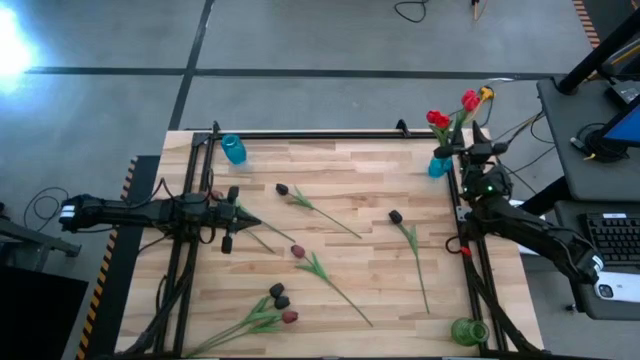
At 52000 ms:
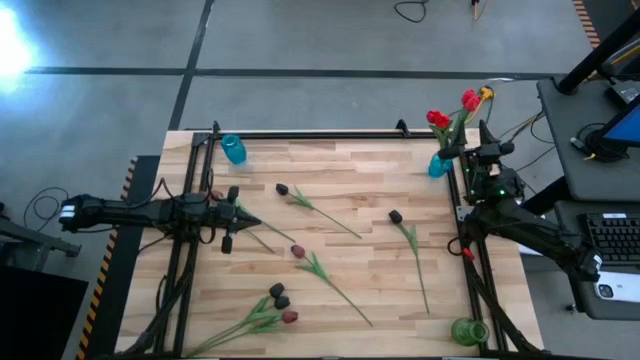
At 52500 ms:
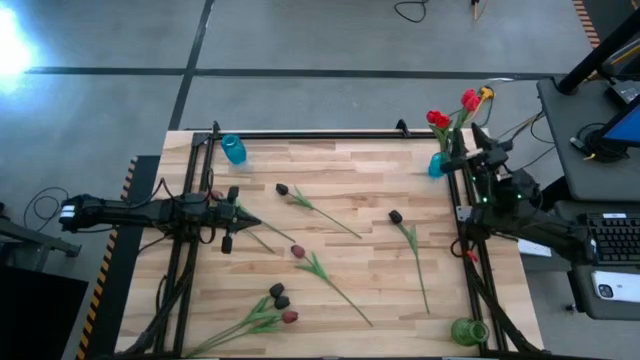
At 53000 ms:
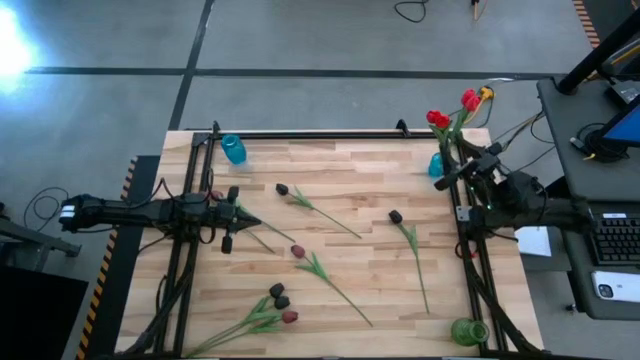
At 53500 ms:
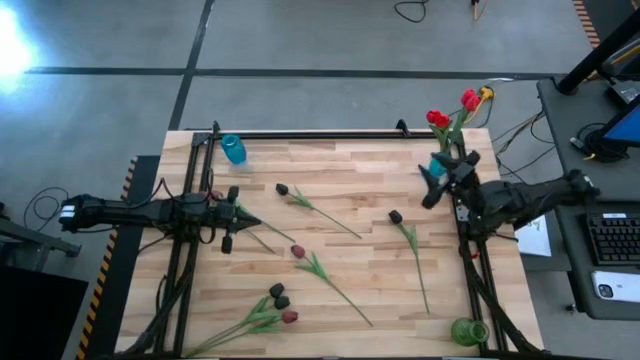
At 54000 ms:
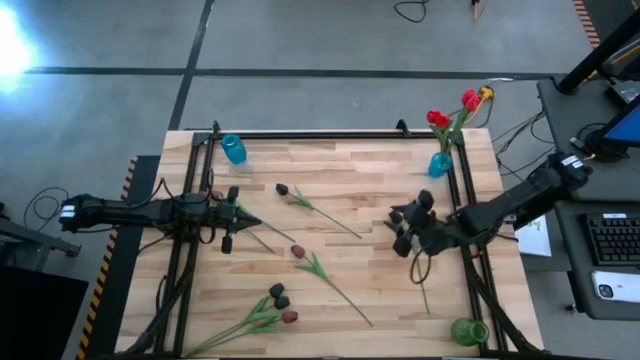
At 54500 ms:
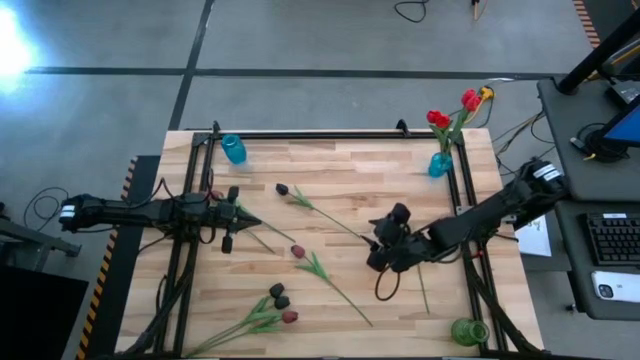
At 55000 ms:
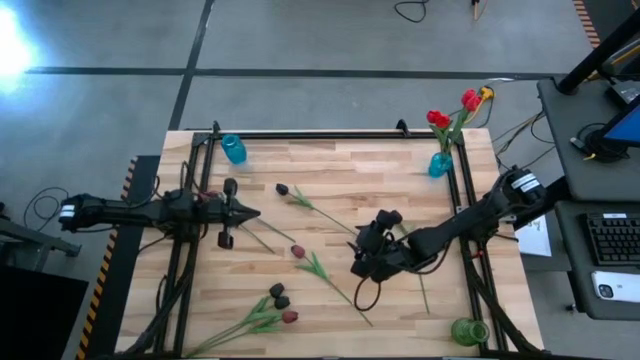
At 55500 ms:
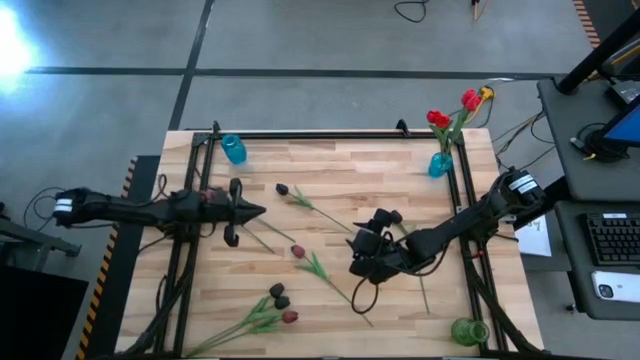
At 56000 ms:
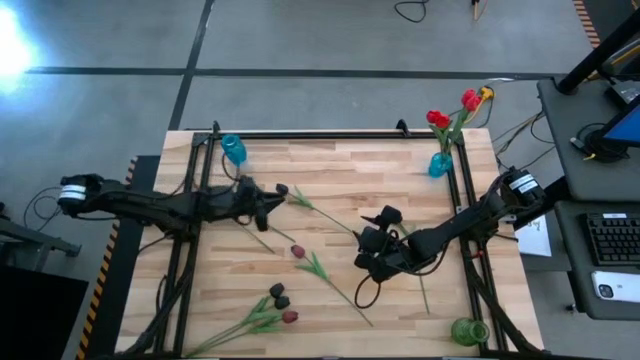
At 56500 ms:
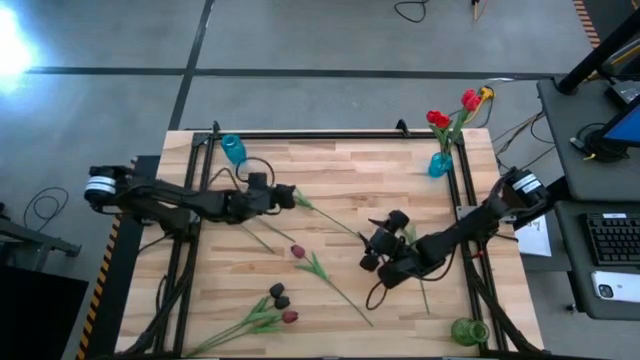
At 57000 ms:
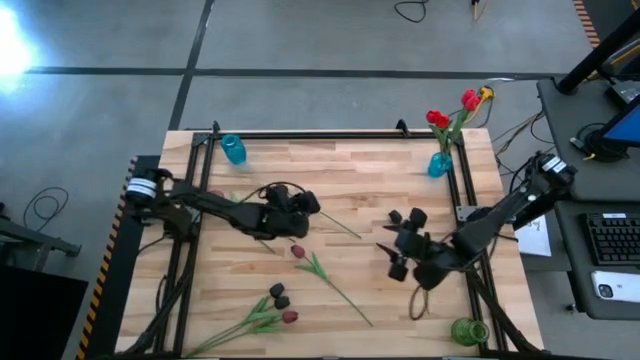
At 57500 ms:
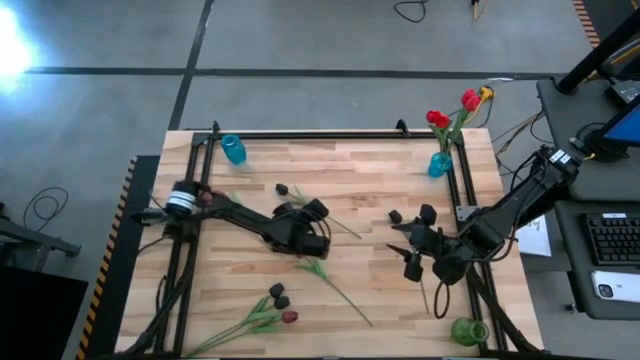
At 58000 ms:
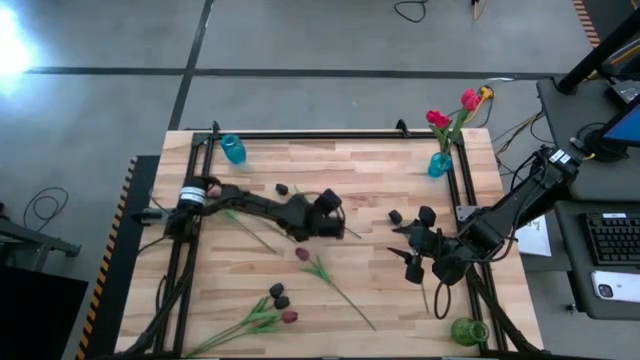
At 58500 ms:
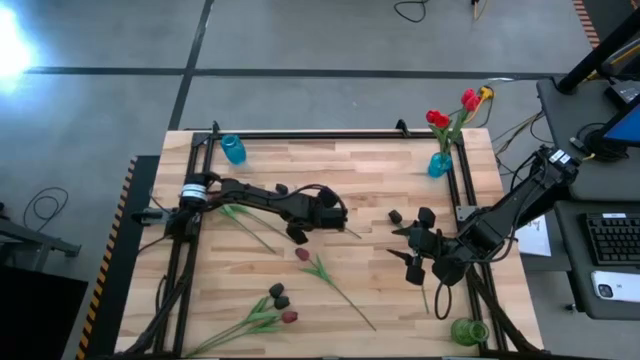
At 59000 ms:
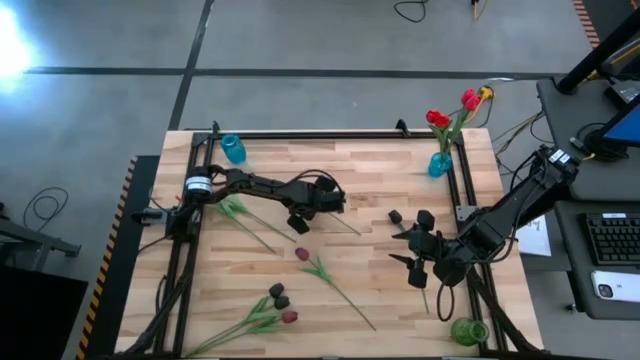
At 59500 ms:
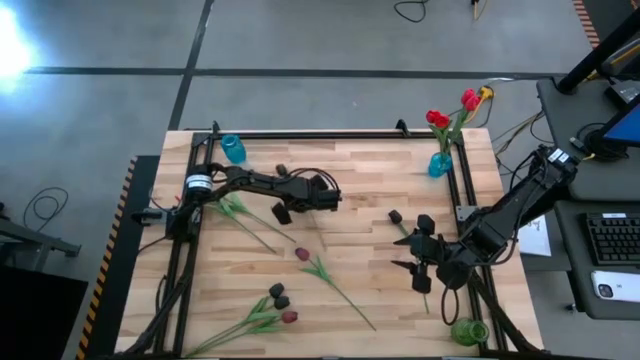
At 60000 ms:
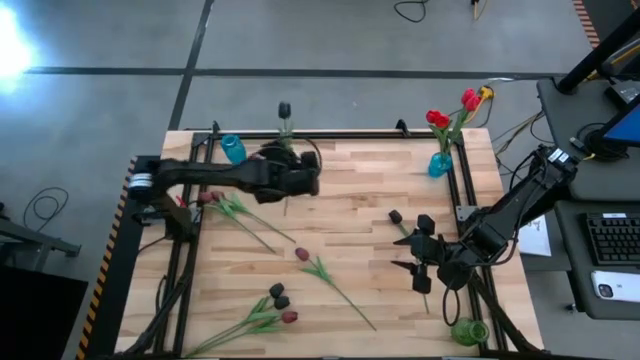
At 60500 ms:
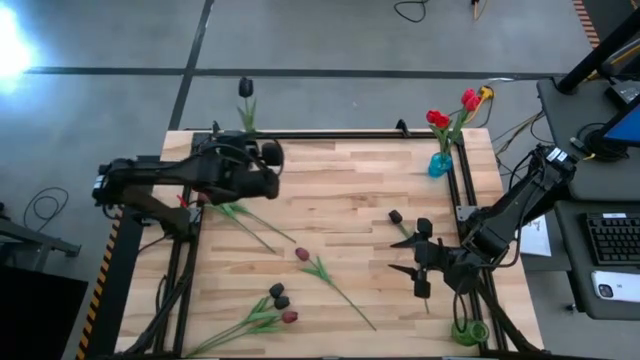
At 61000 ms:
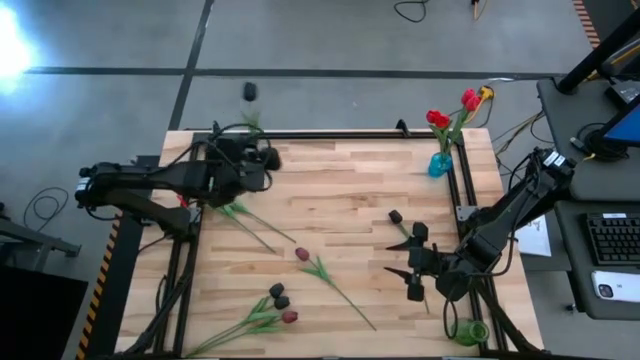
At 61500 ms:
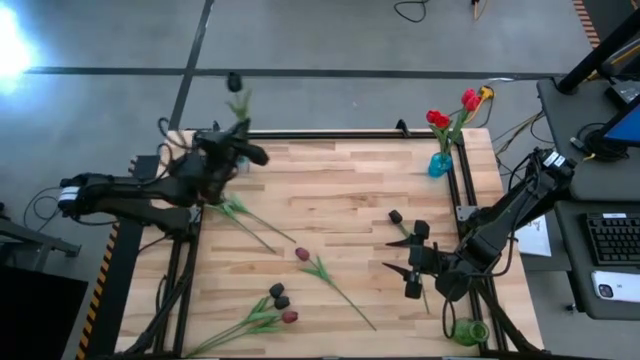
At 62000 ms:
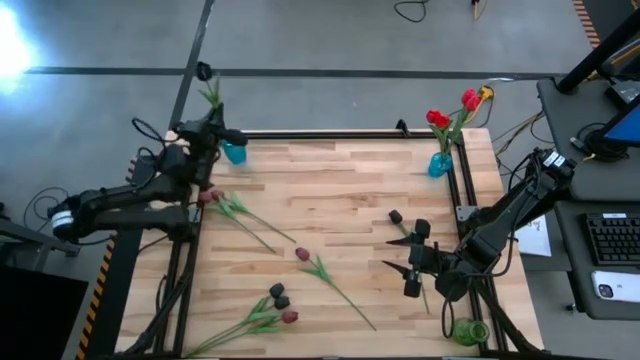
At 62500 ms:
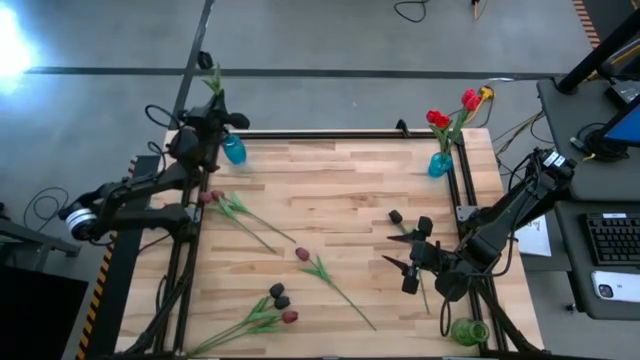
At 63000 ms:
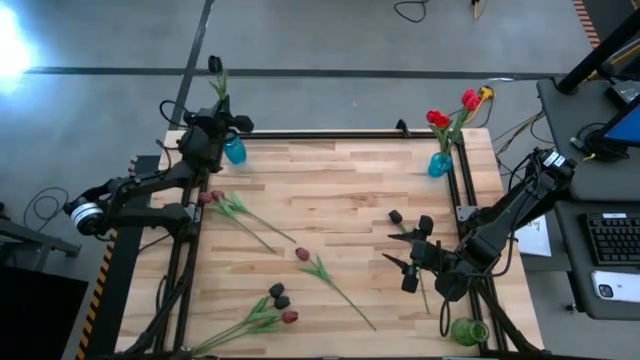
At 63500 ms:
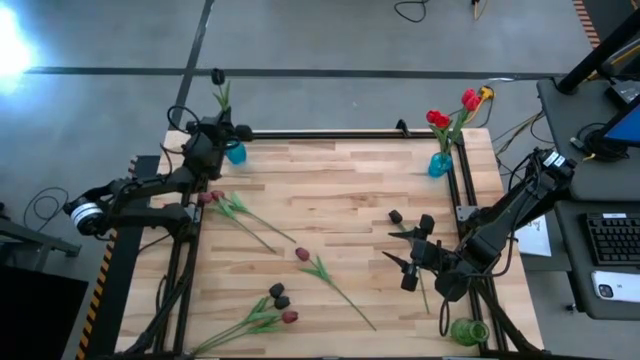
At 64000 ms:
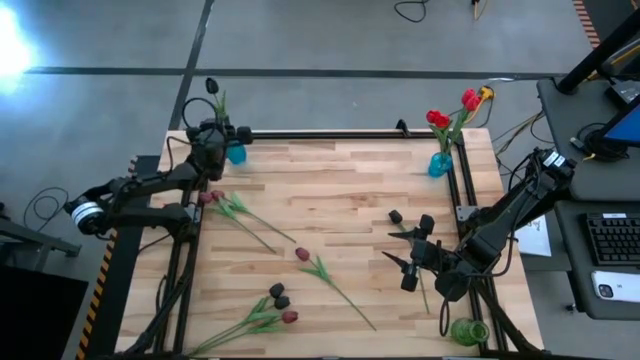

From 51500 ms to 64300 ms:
Task: Sort flowers into vase by color
Put the black tulip into the left blue vase

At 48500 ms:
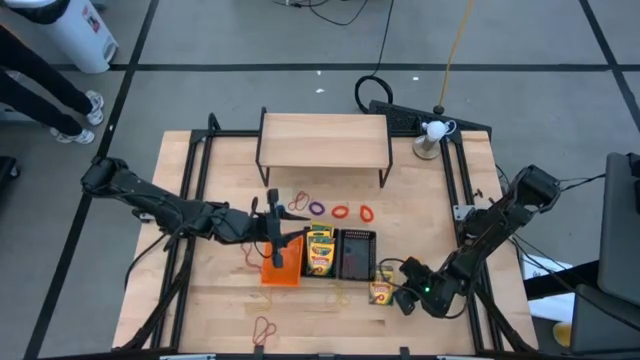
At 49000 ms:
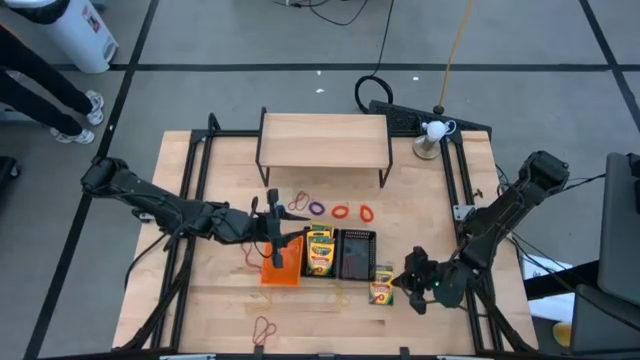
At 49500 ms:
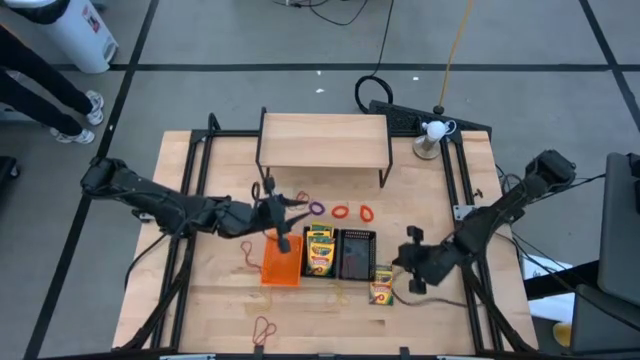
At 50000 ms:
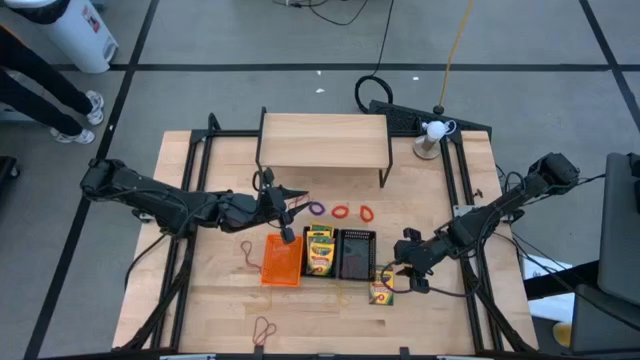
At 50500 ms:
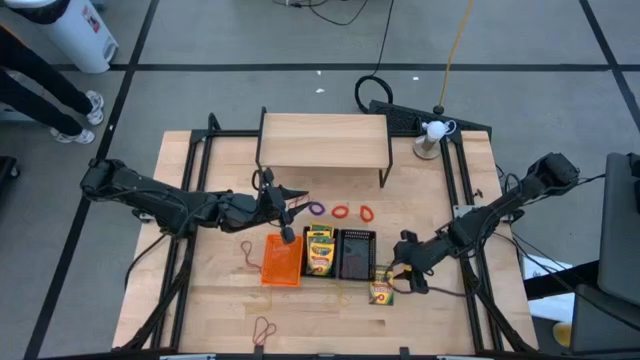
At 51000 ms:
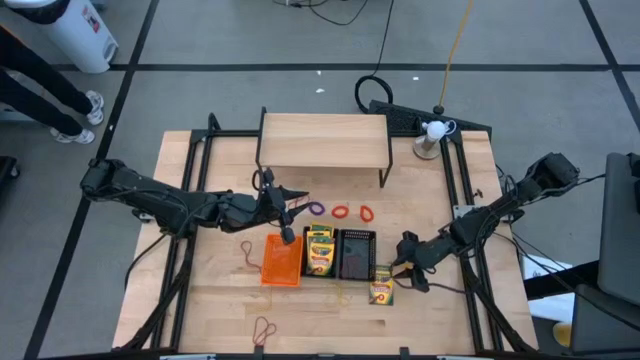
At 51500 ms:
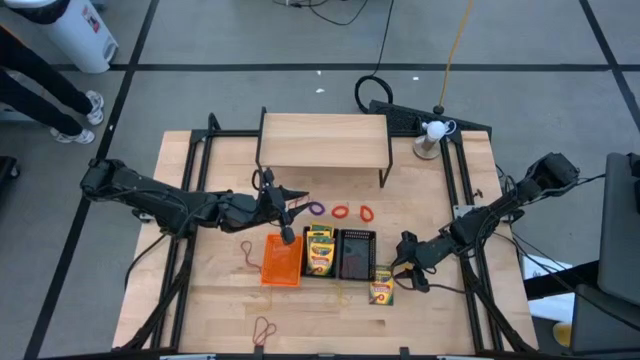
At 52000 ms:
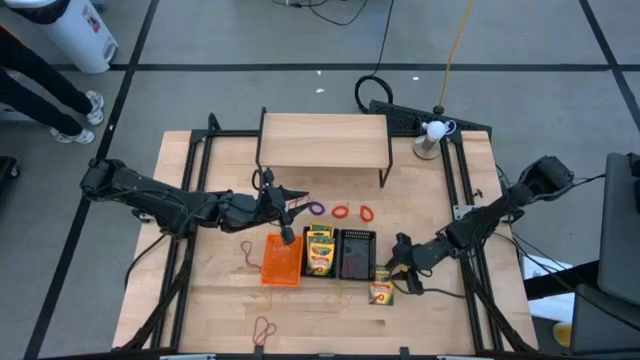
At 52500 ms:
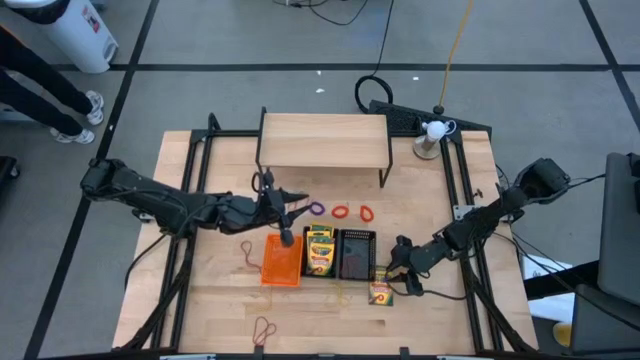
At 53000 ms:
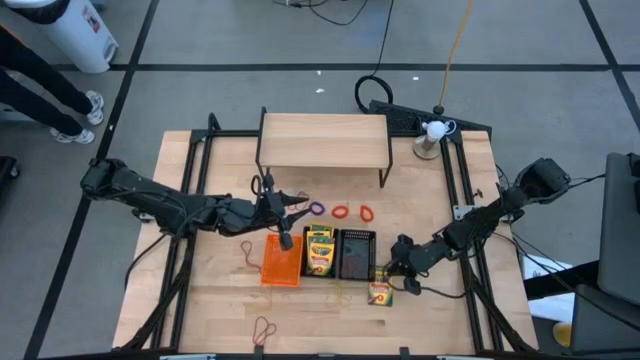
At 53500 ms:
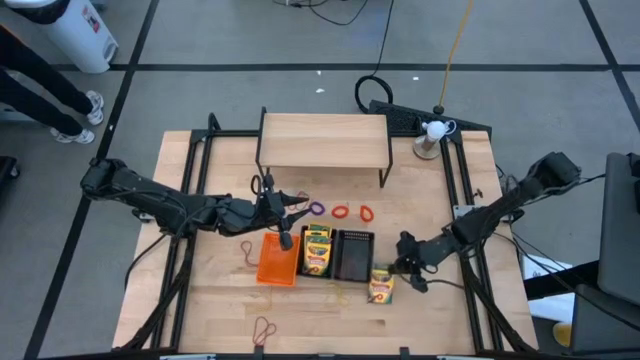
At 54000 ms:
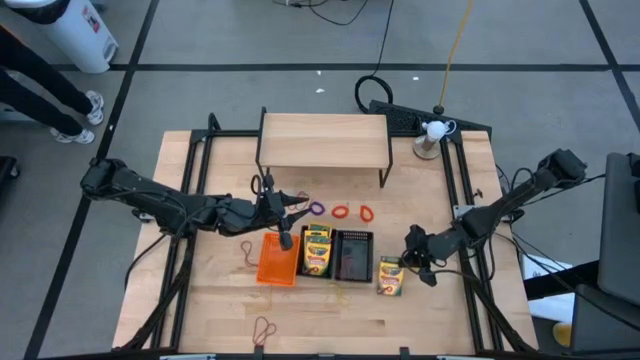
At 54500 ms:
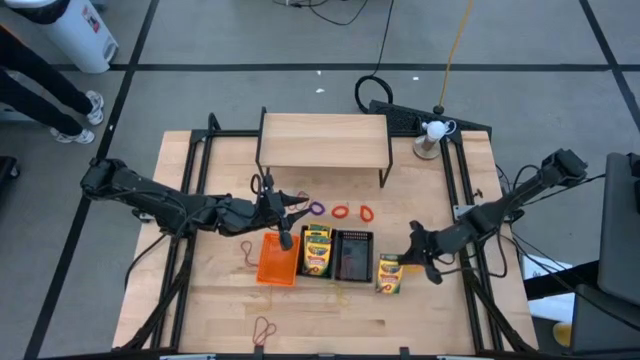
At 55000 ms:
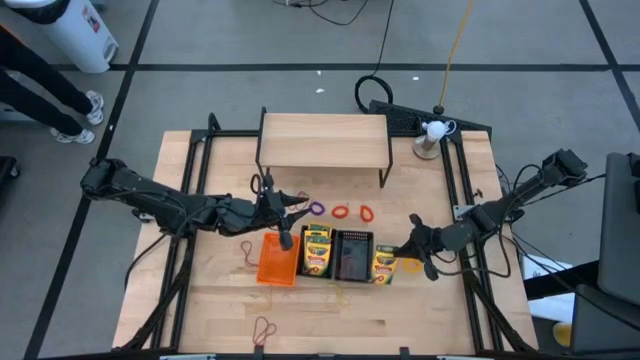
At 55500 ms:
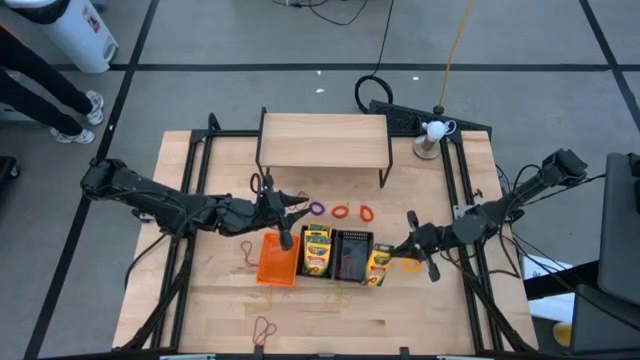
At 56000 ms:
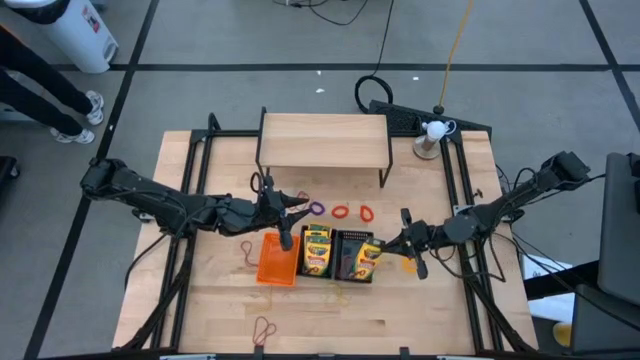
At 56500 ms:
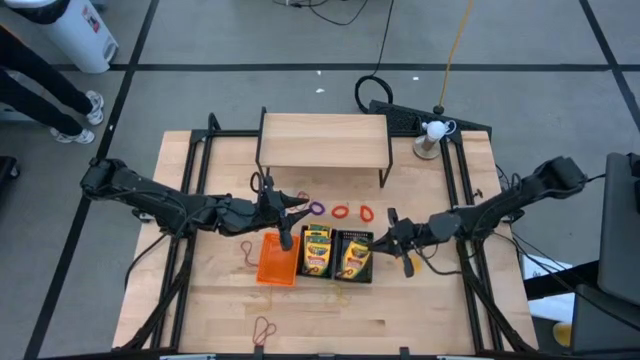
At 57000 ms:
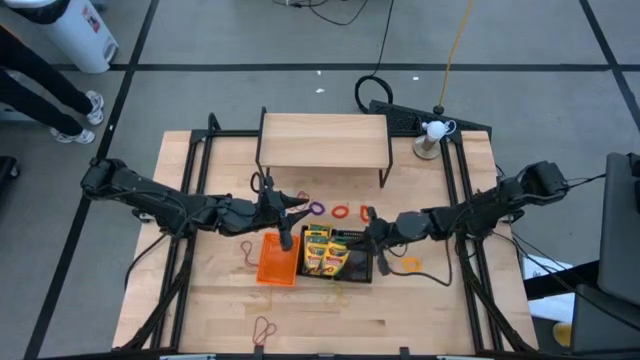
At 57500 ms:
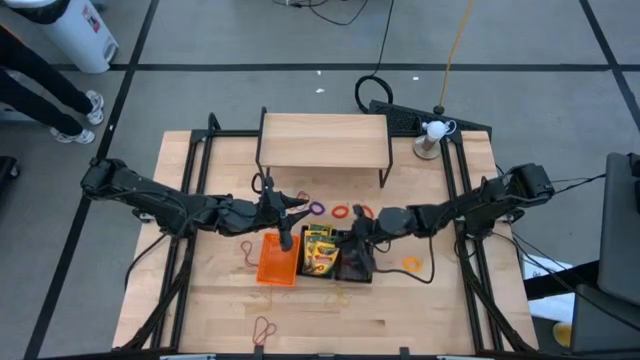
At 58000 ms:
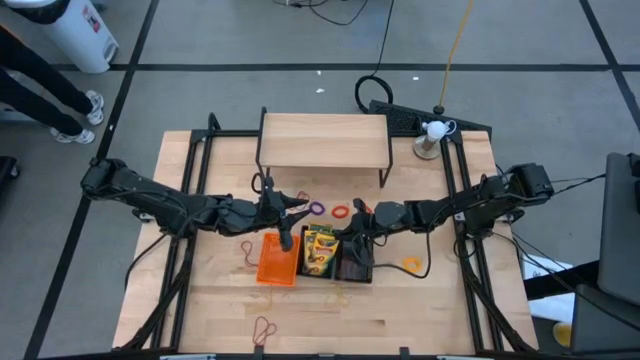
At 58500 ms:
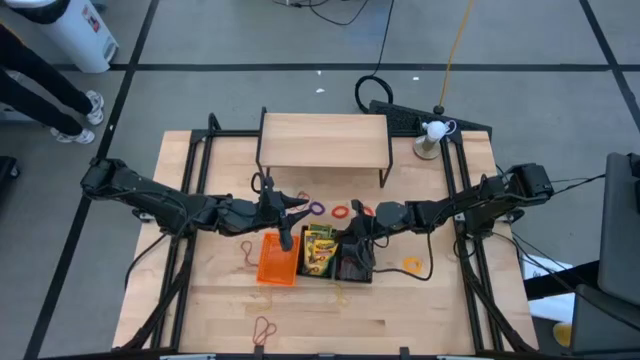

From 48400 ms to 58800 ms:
Task: Pick & Place Office Desk Supplies
Put the crayon into the left black bin
